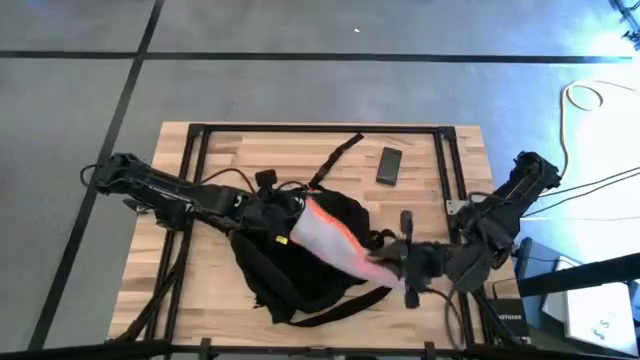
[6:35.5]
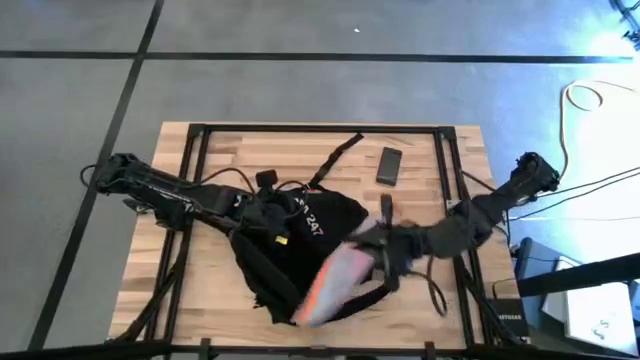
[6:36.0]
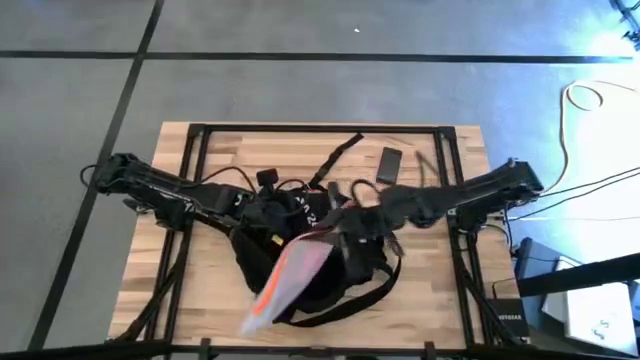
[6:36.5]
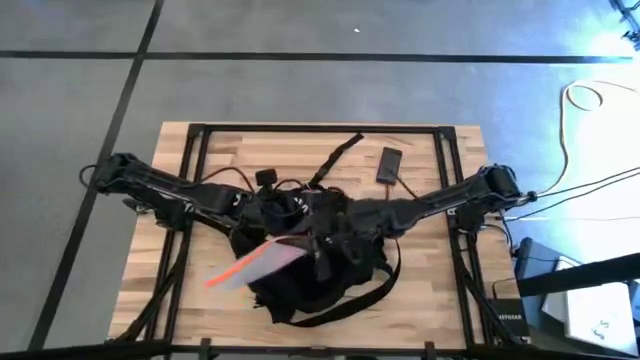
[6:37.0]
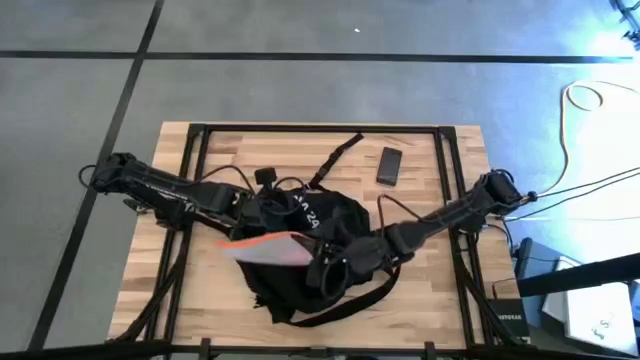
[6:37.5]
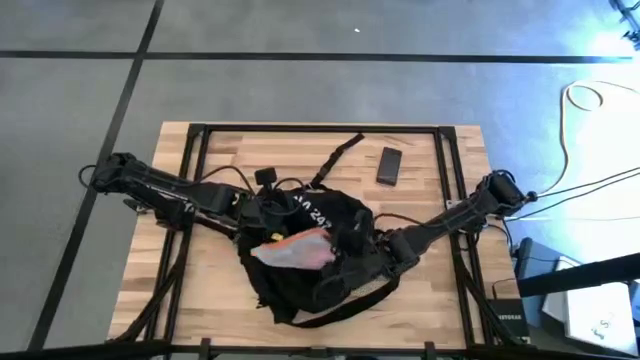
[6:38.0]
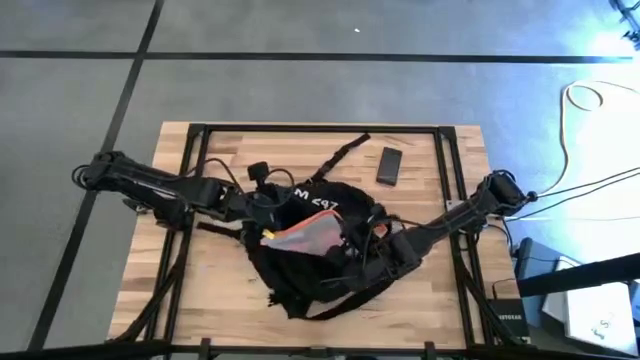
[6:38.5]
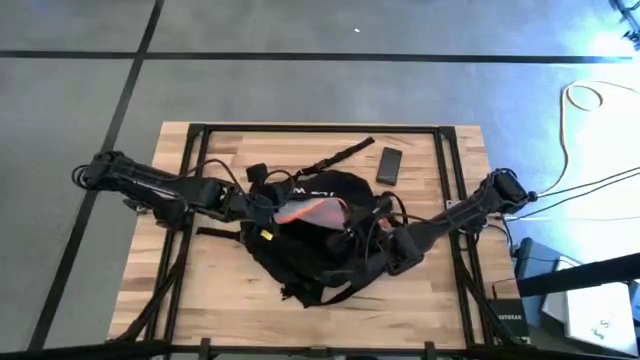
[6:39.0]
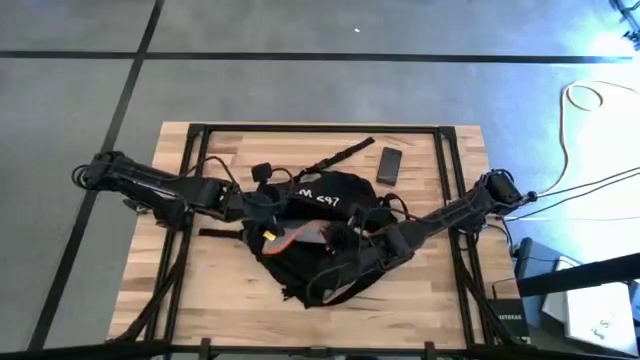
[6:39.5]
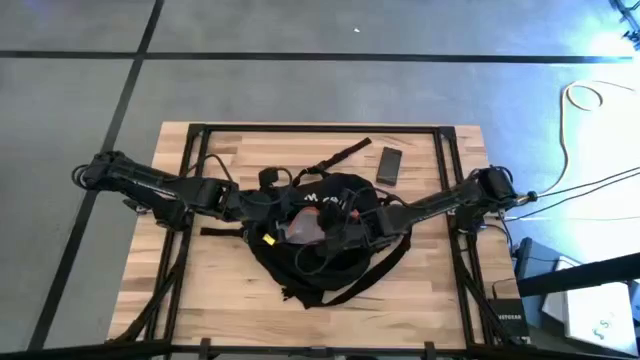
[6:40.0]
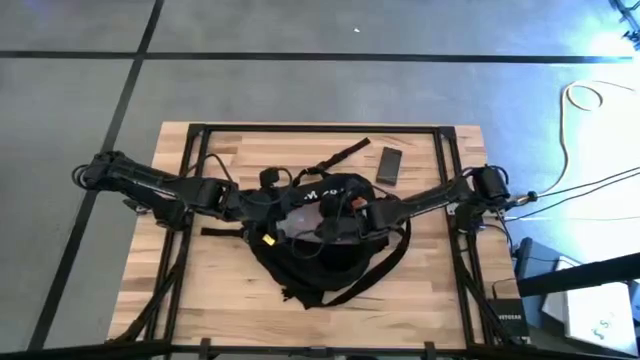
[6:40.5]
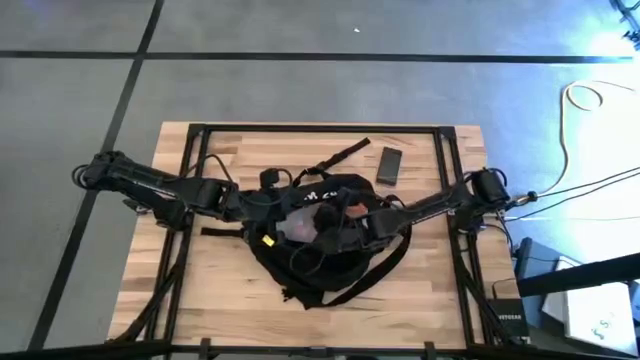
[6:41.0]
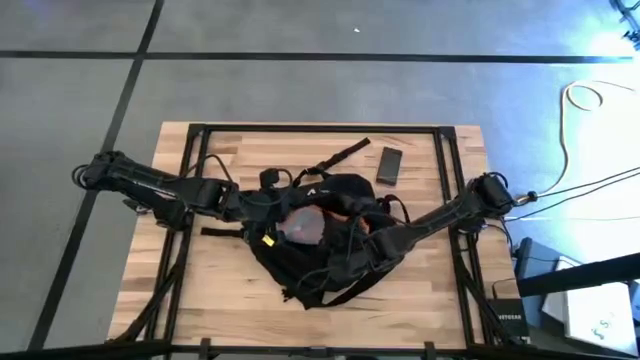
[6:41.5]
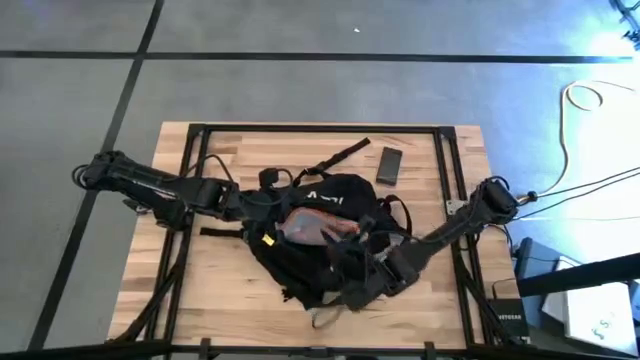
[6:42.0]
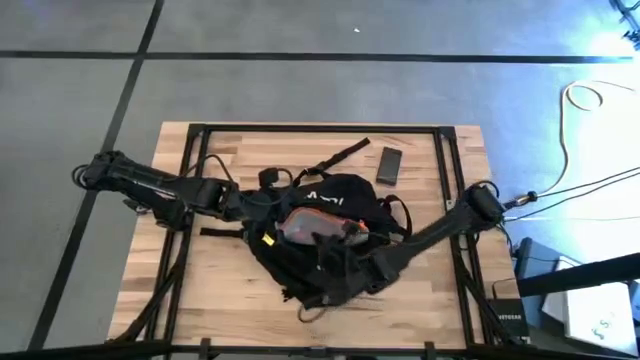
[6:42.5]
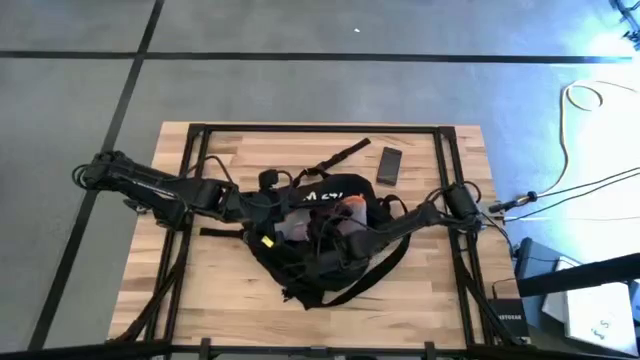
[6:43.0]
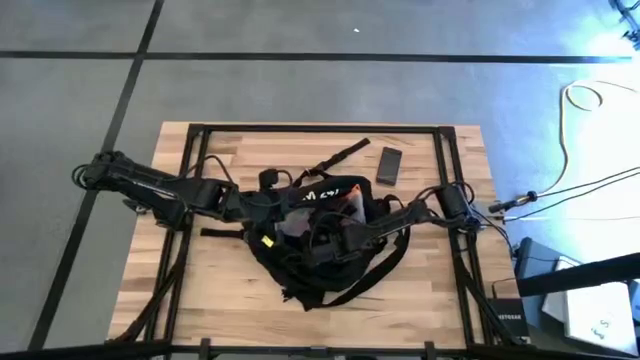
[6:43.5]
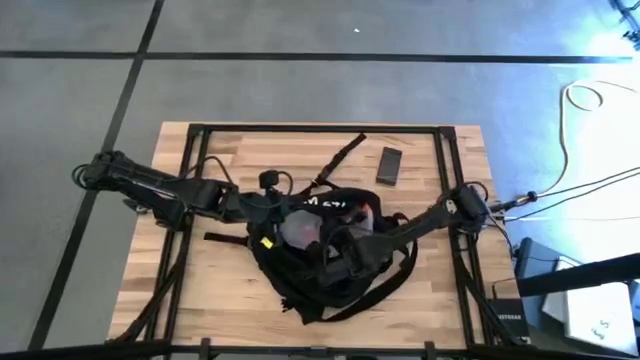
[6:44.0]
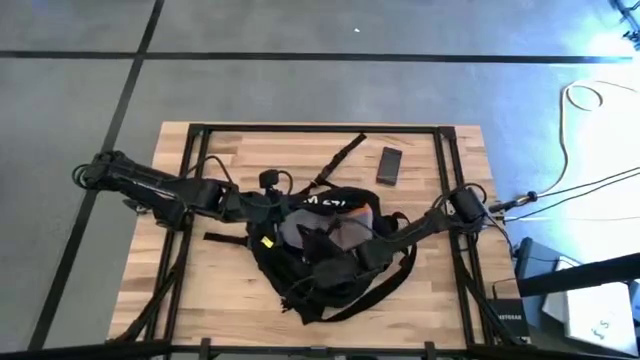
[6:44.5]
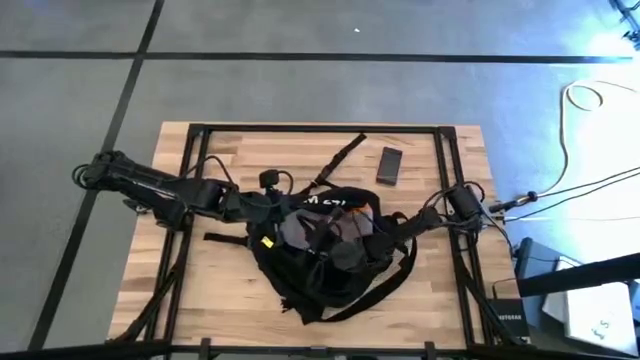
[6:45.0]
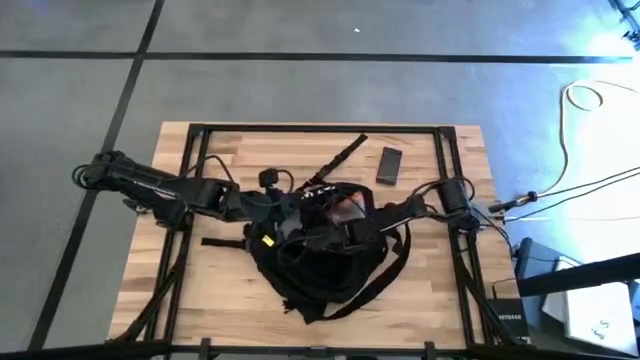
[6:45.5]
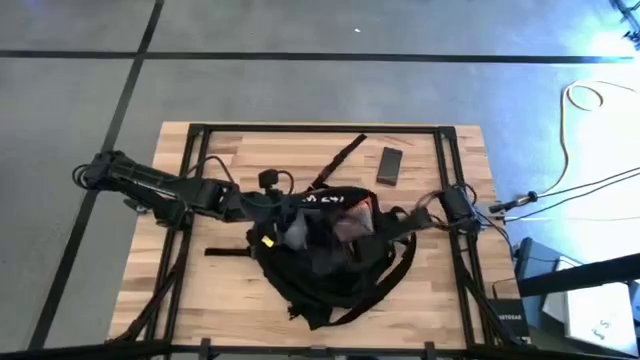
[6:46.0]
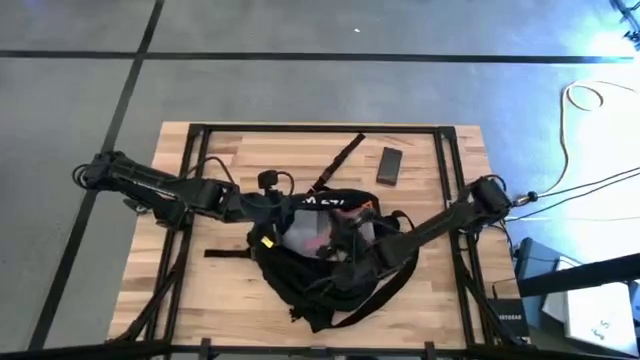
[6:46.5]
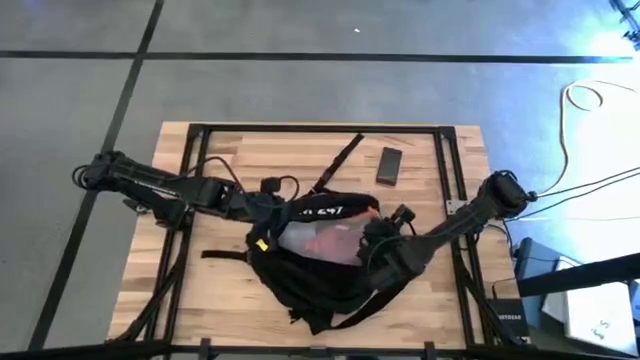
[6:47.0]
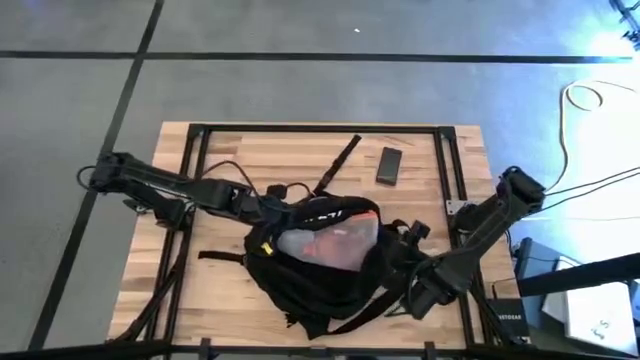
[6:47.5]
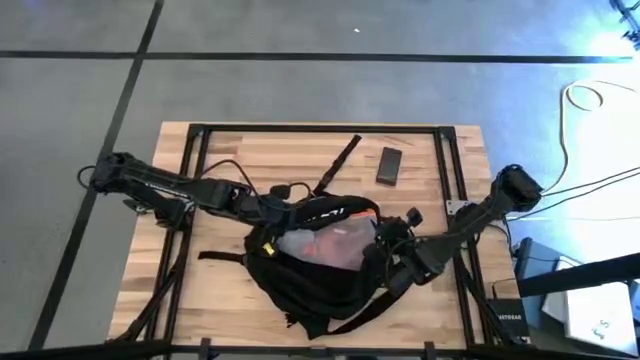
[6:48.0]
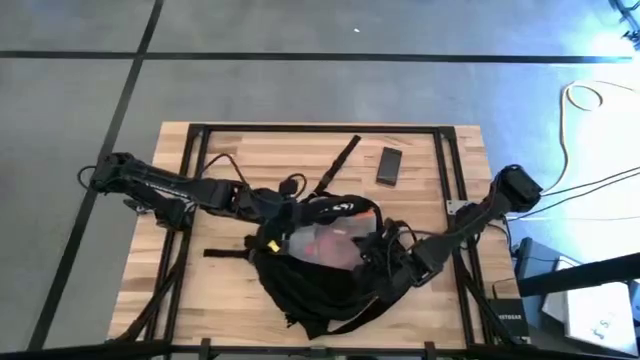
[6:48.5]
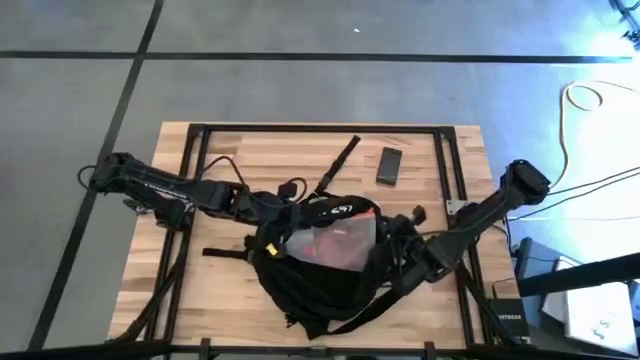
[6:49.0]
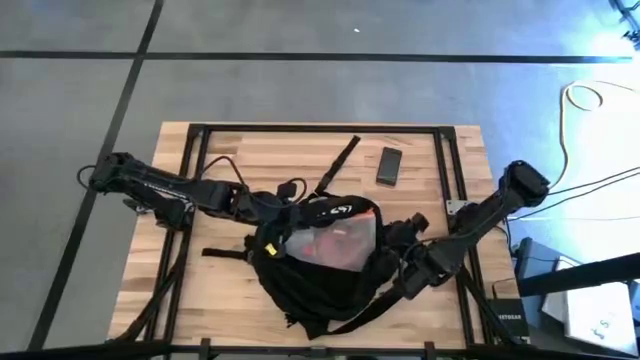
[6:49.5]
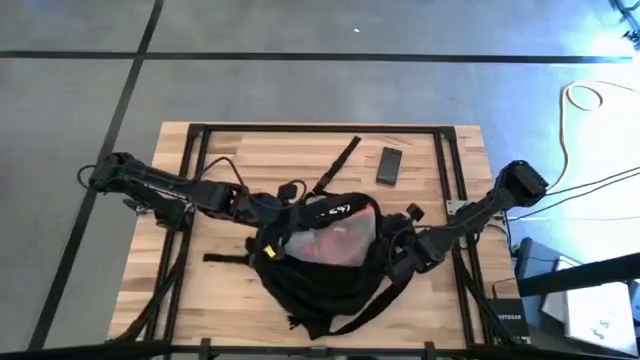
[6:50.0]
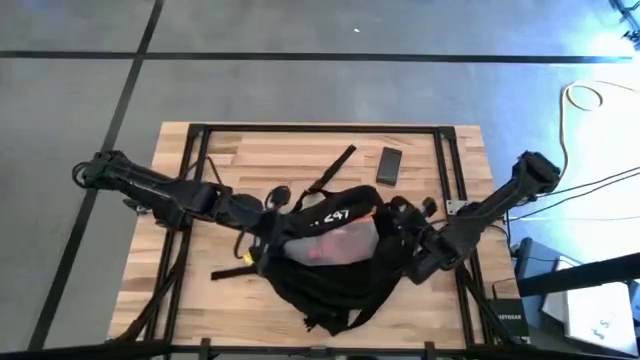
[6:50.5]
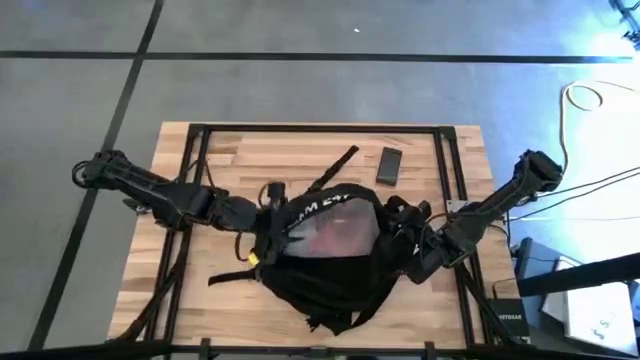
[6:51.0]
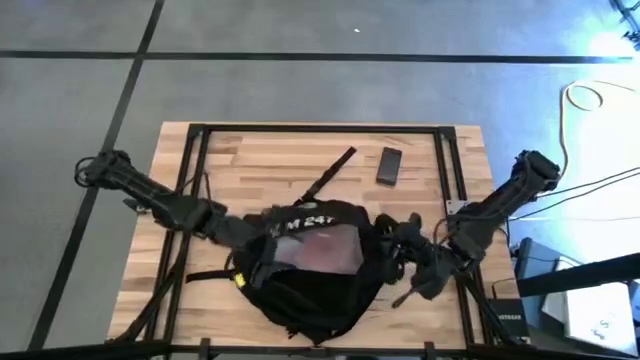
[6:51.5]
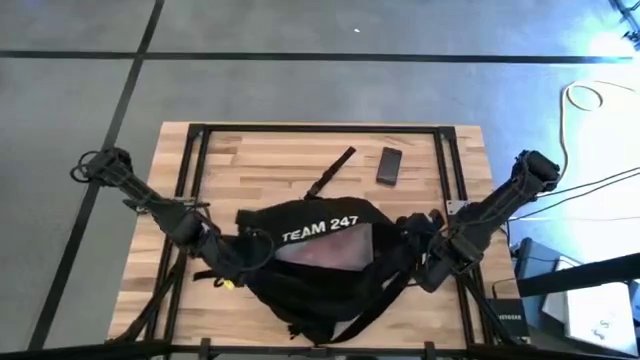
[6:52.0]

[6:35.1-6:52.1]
Task: Unpack backpack
Put the white zip bag into the black bag
